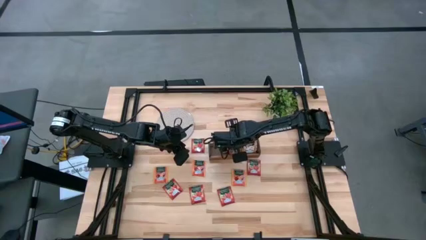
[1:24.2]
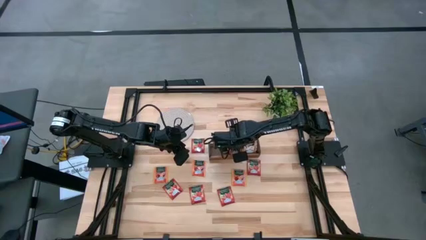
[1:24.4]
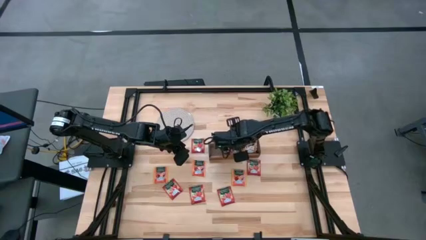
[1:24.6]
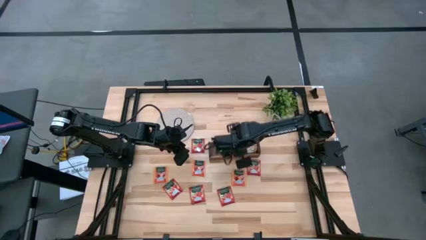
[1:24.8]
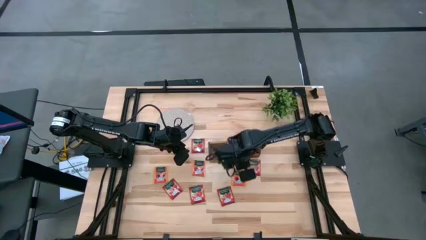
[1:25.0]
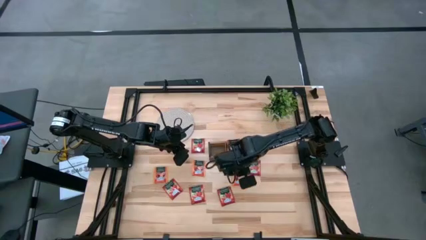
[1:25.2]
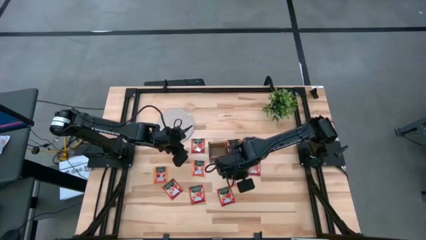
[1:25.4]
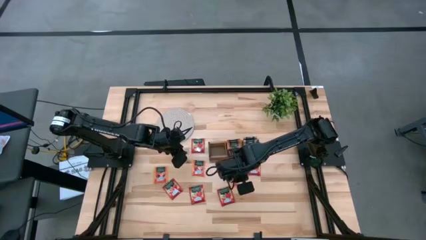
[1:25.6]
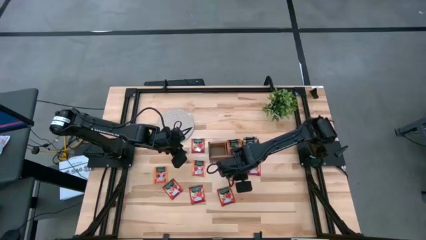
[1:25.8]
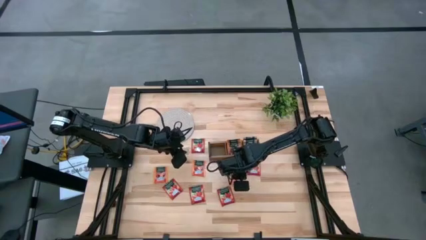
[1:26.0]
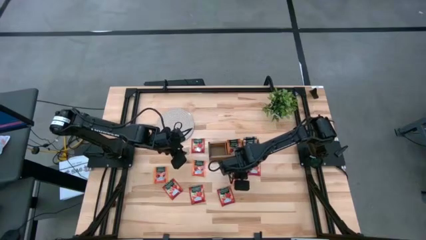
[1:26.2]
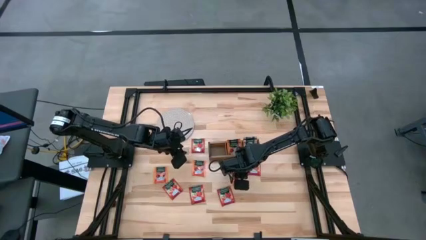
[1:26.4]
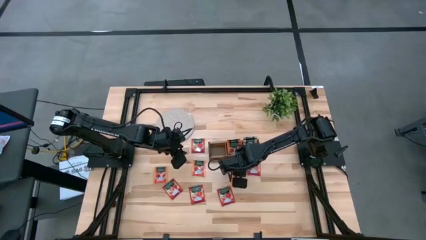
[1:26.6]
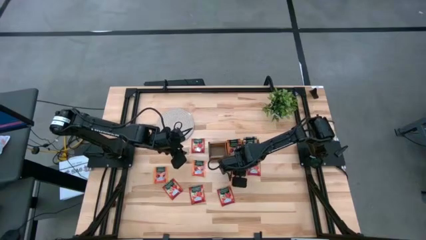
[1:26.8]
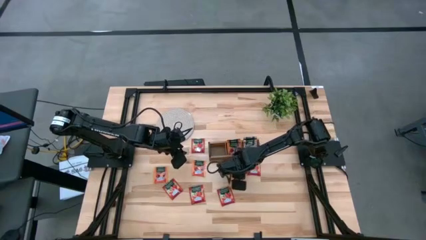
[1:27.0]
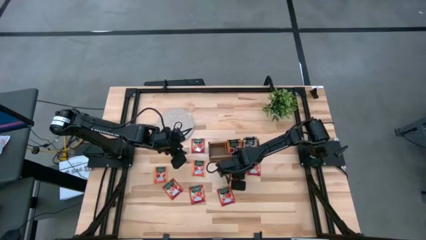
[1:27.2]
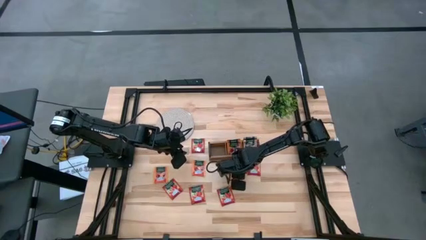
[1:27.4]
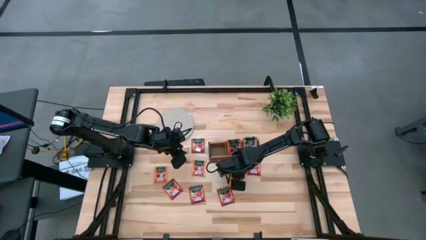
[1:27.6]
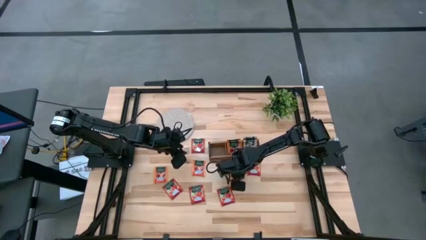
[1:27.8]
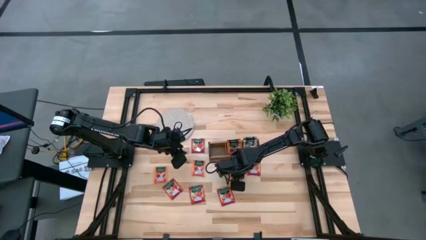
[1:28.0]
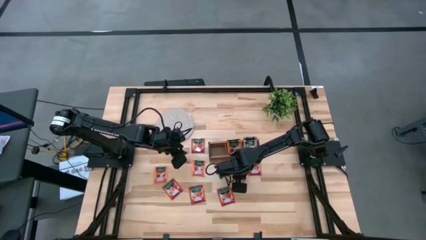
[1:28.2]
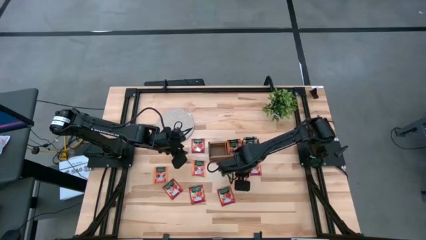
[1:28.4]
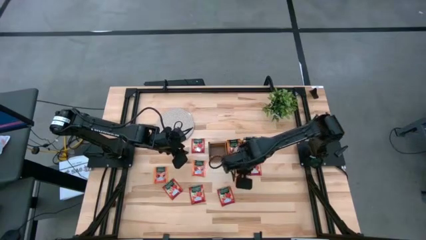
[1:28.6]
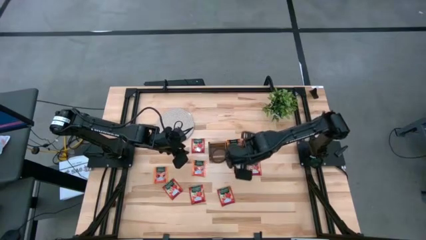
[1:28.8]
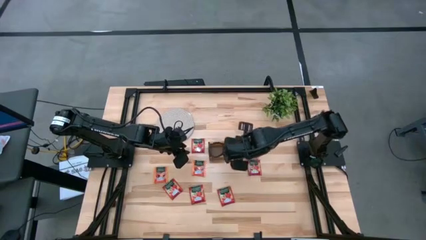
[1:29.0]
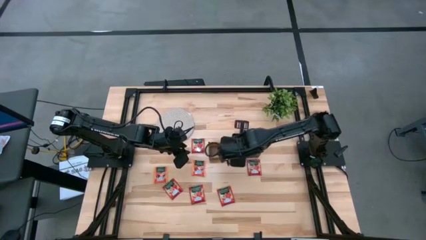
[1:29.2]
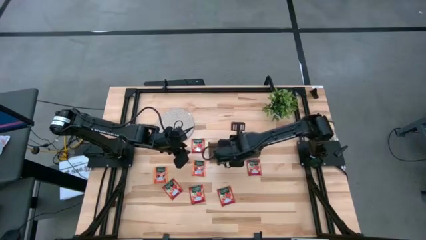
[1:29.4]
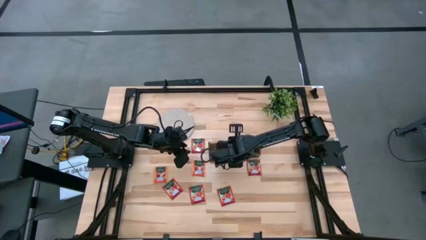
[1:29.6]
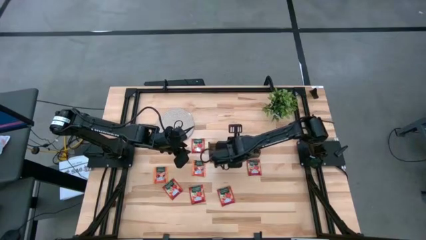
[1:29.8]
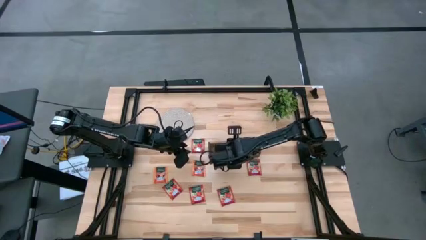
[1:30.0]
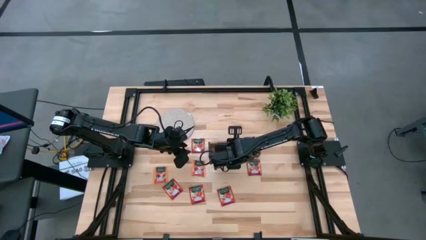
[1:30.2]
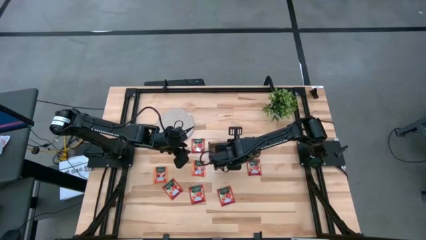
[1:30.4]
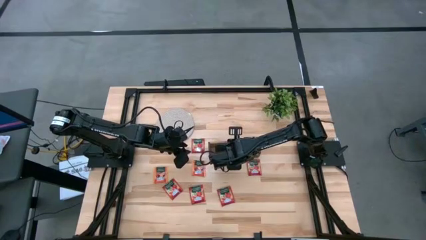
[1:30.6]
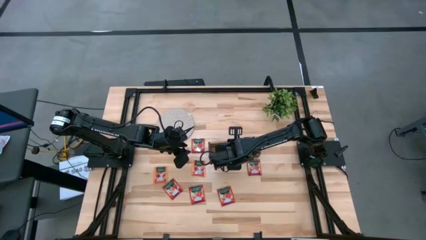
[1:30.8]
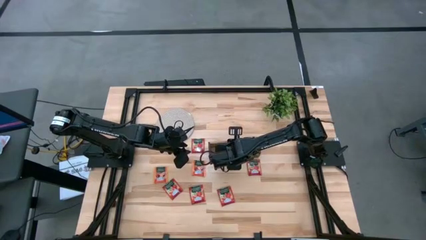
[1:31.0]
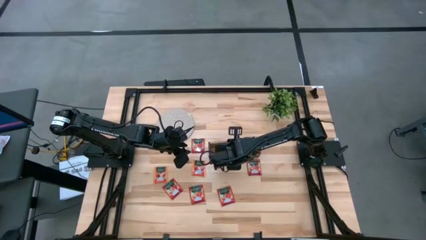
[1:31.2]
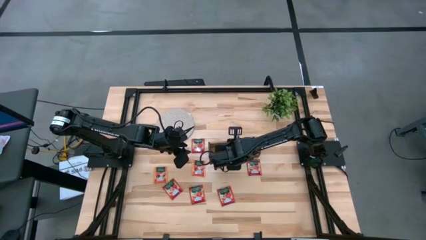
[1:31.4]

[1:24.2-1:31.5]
Task: Pick & Place Tea
Put the orange tea bag into the middle section of the wooden organizer

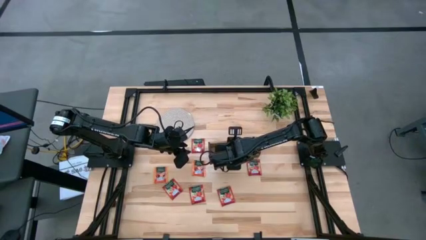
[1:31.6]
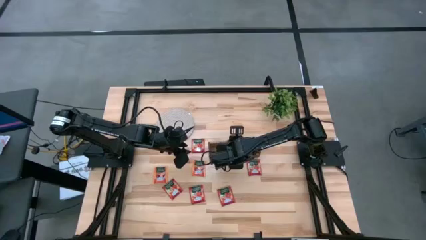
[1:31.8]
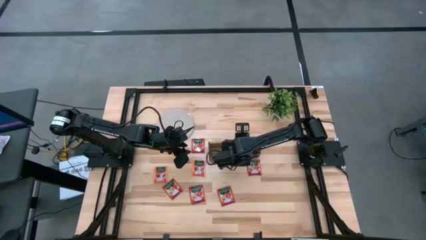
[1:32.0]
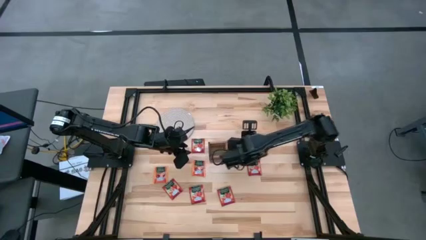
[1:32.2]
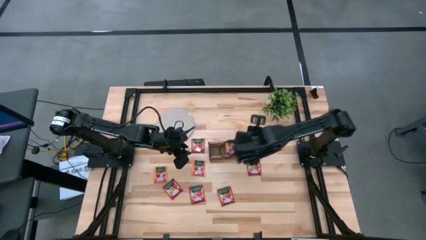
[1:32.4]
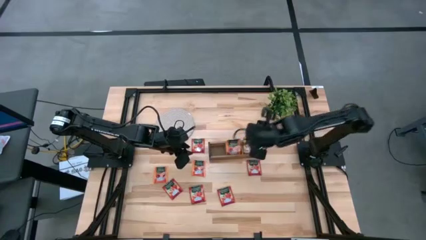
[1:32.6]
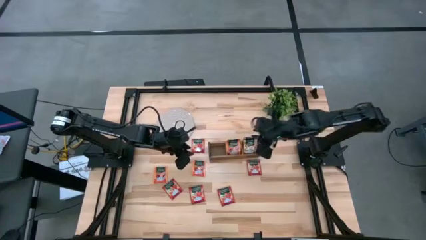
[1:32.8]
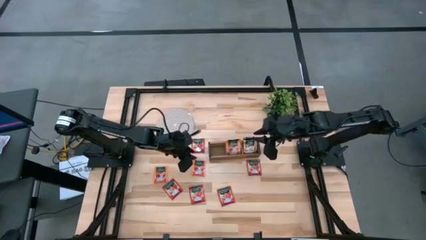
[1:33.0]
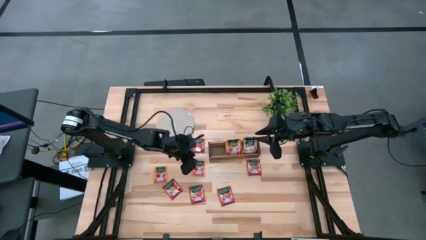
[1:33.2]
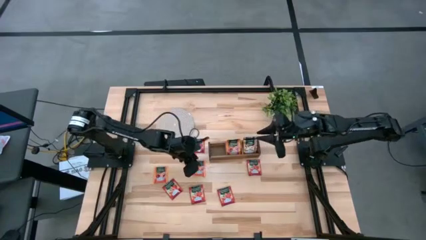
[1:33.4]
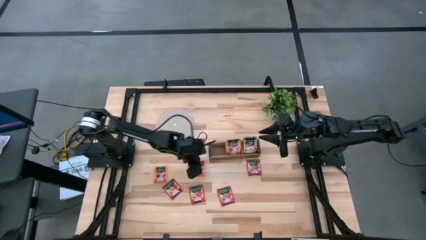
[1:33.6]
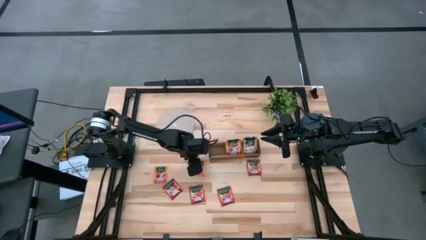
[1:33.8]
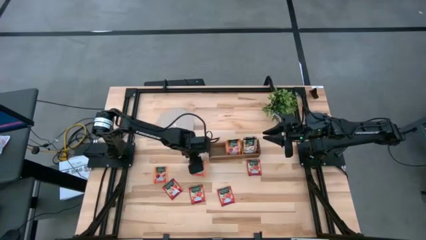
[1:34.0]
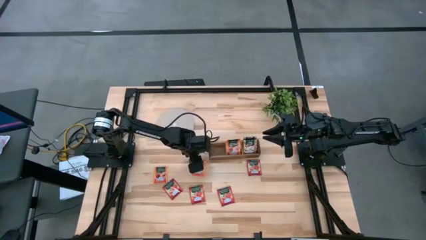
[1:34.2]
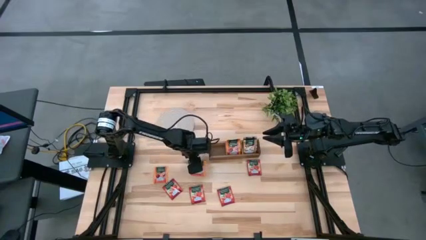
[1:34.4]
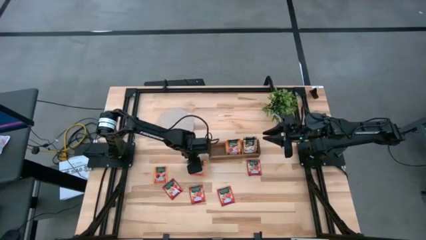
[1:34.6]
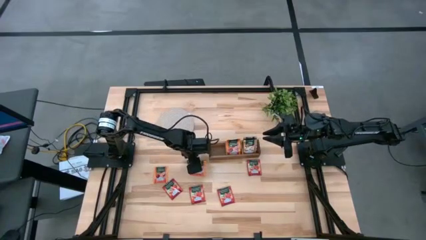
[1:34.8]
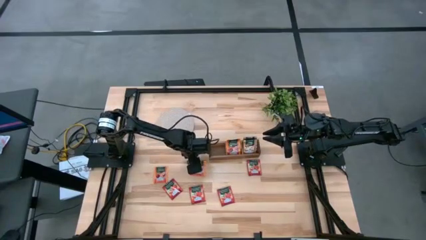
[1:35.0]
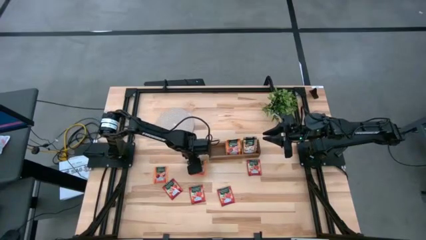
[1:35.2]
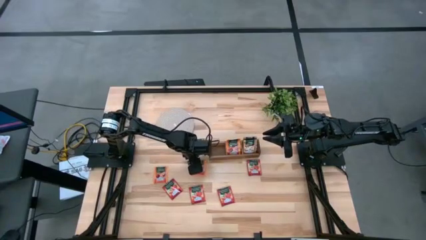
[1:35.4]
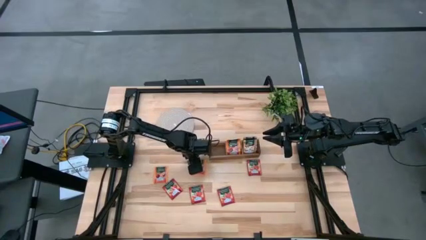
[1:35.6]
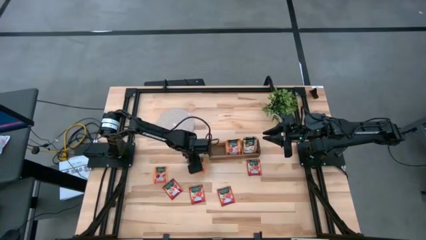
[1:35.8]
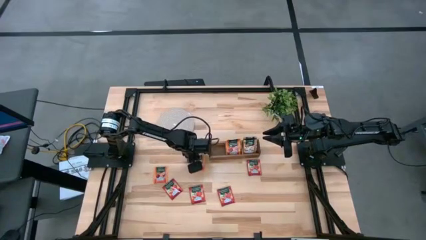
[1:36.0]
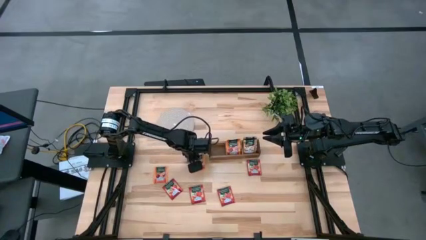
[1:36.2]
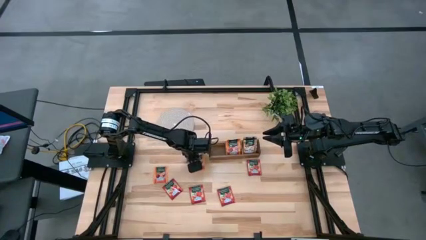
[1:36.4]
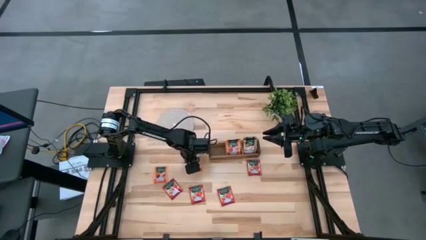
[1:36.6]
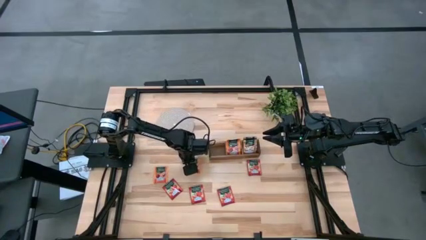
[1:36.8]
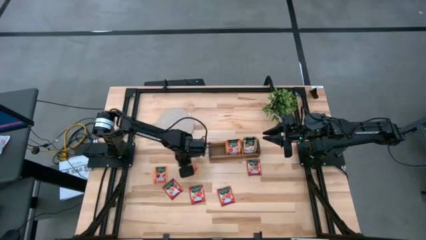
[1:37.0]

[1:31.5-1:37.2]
Put the orange tea bag into the middle section of the wooden organizer

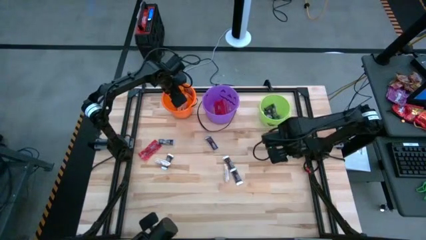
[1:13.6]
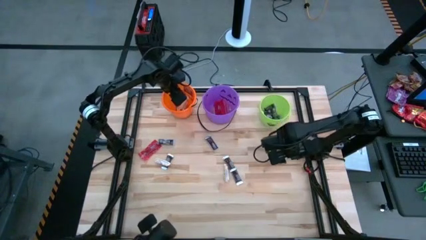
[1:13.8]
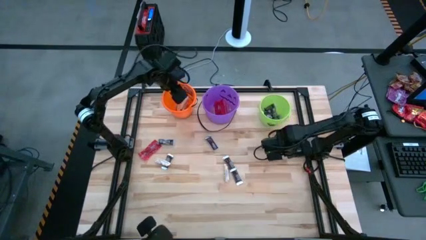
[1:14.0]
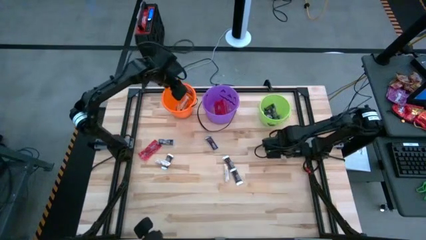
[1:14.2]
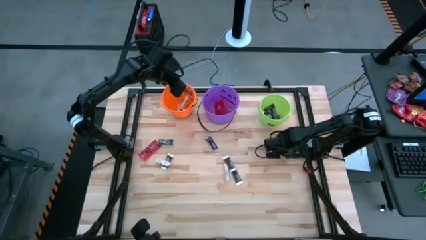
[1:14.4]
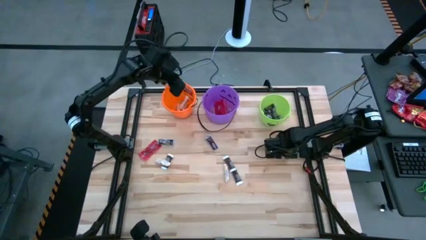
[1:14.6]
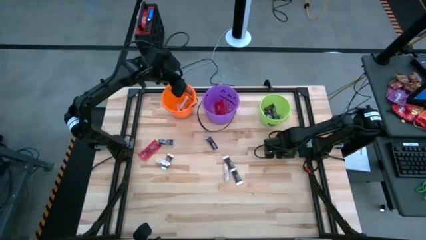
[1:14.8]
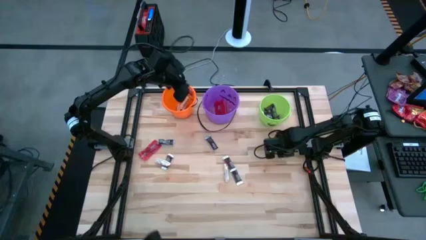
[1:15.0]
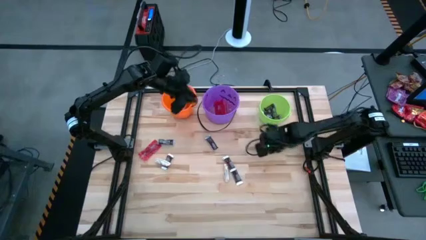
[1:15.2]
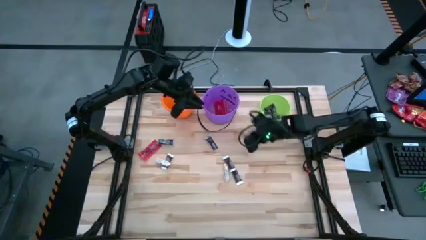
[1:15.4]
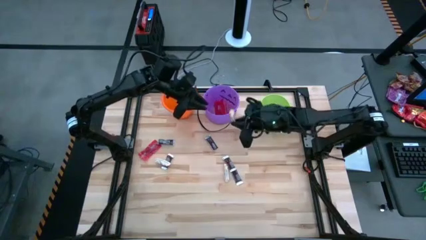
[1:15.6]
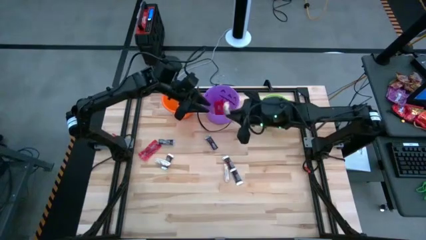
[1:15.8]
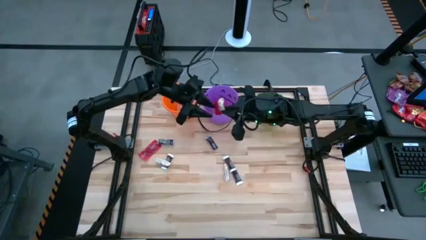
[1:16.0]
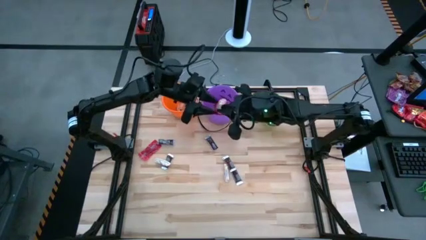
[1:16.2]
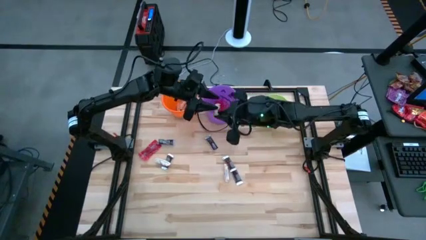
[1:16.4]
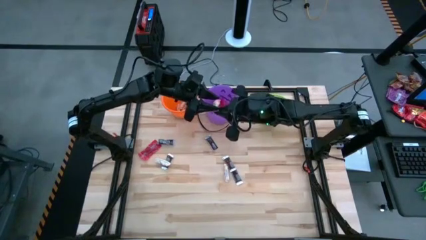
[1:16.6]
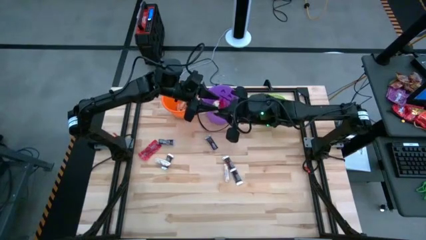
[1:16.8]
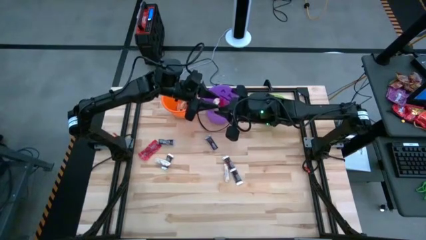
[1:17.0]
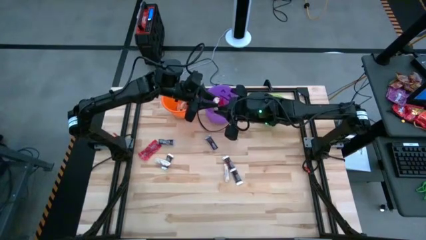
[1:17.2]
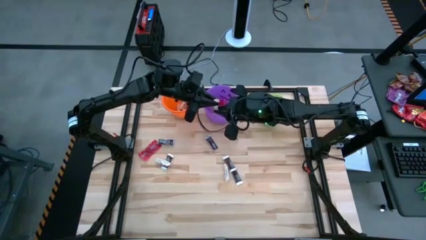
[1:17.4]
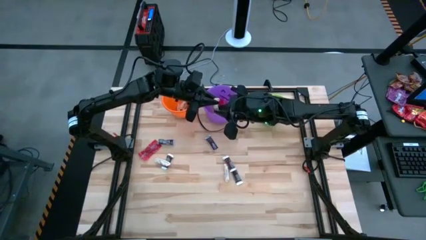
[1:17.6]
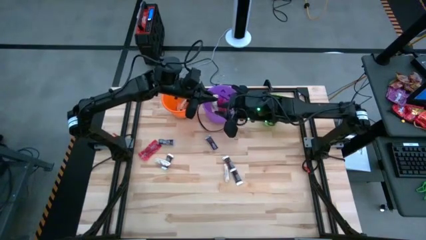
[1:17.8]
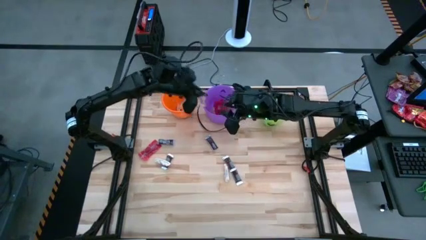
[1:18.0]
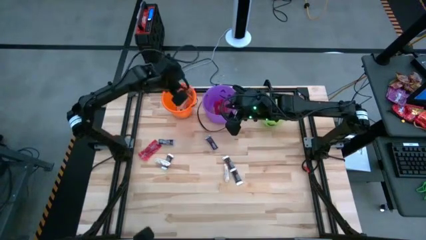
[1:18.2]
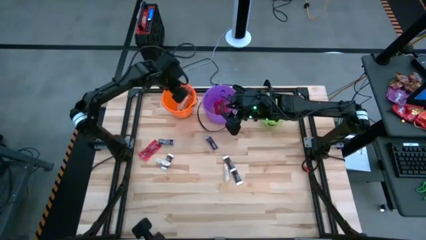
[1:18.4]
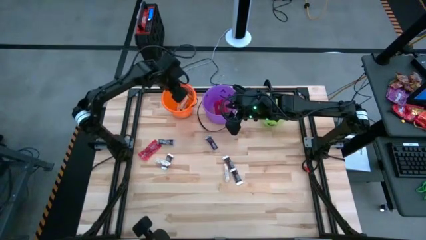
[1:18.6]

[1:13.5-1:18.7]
Task: Sort candy by brand, put in halloween buckets
Put the white chocolate bar into the orange bucket
